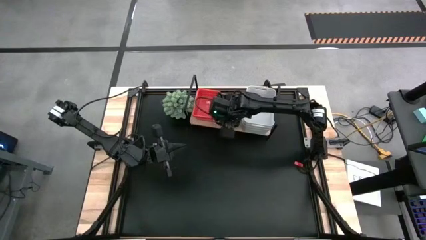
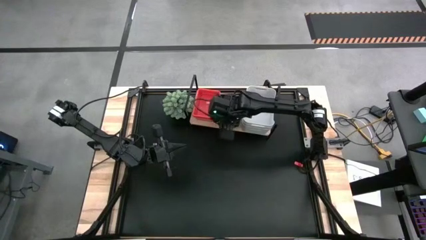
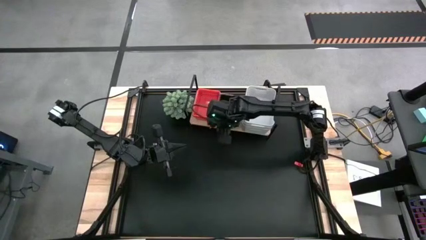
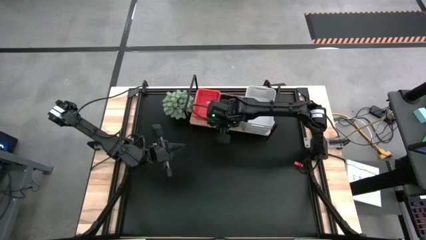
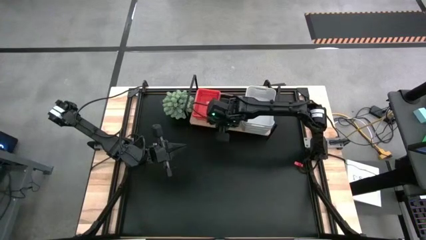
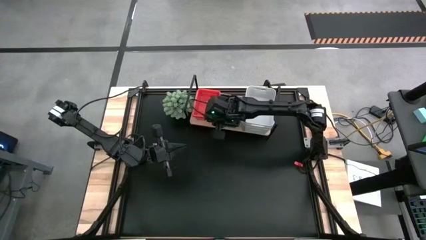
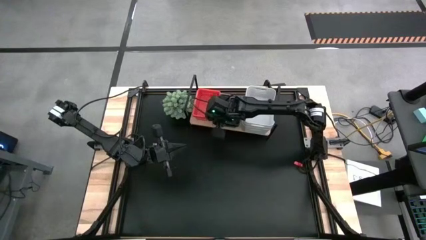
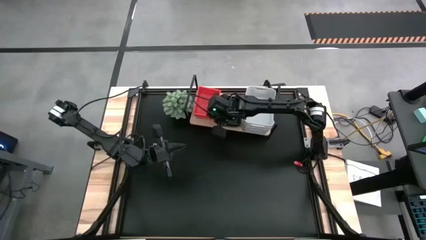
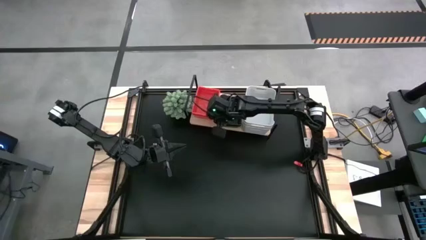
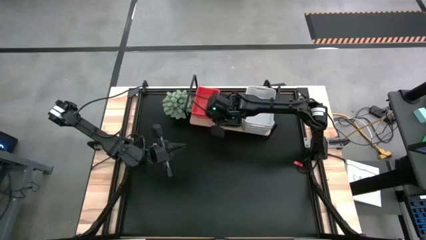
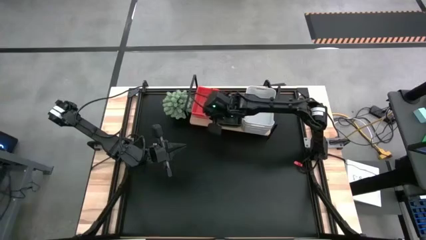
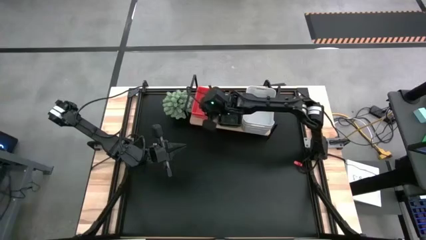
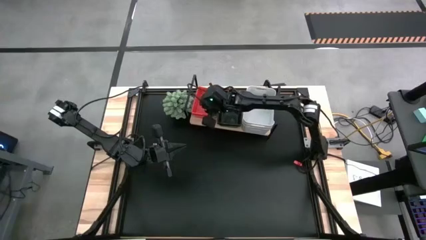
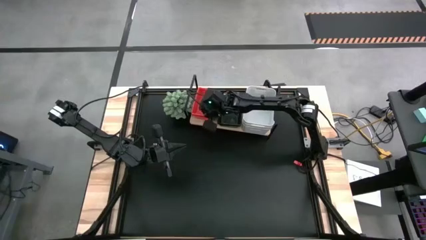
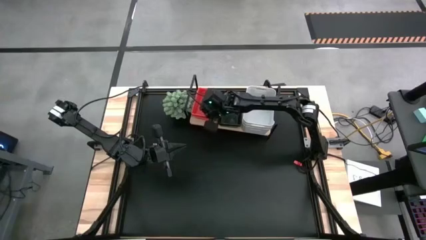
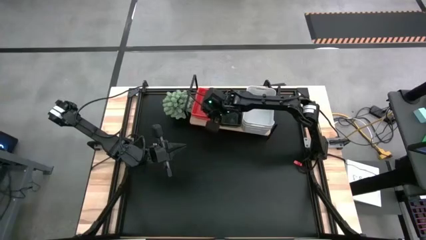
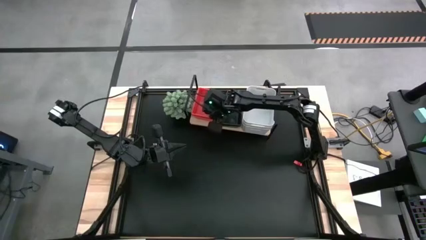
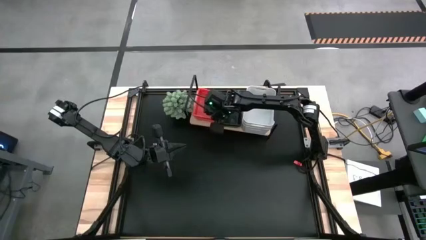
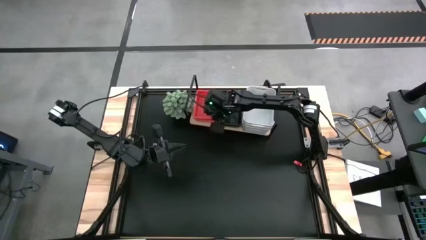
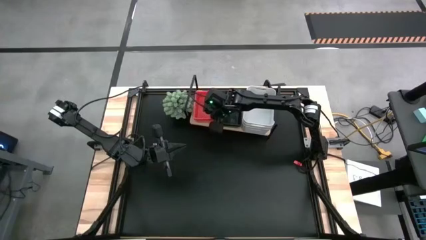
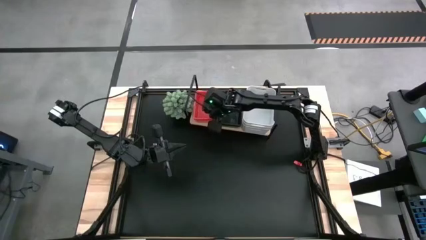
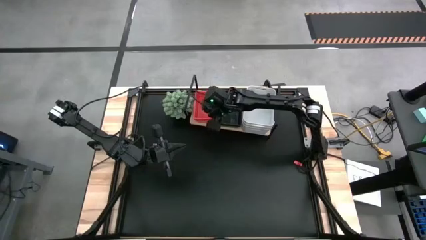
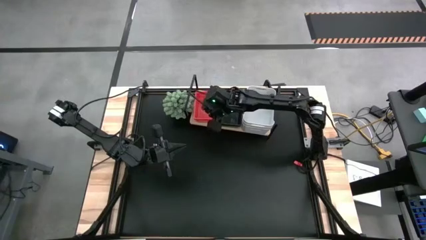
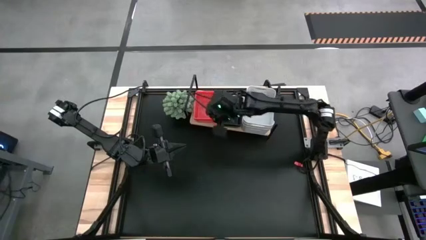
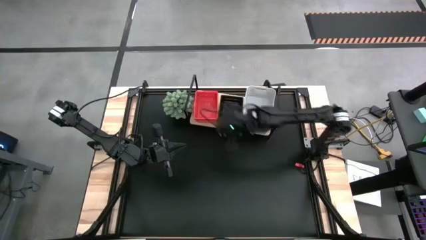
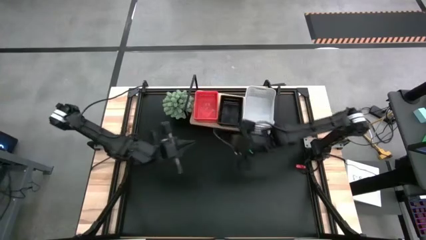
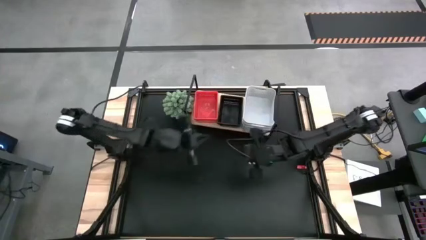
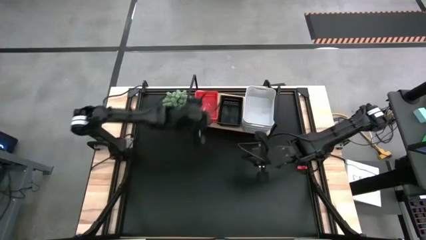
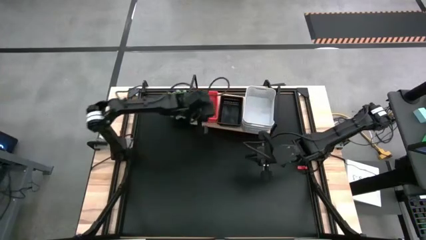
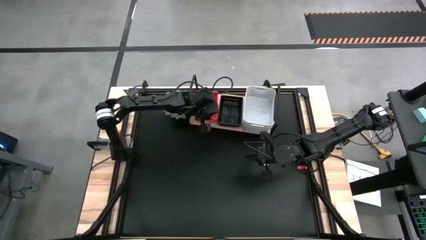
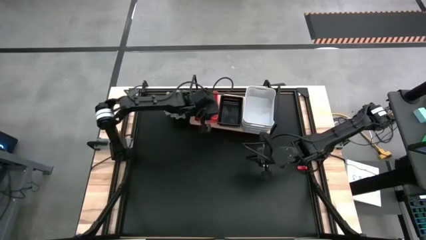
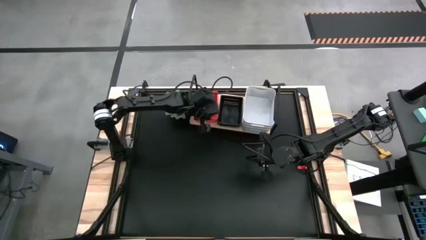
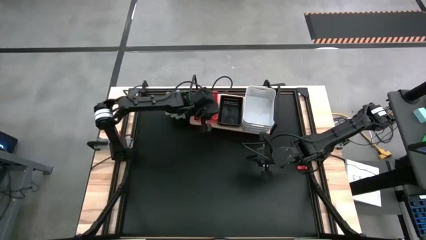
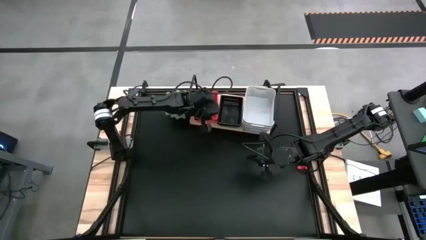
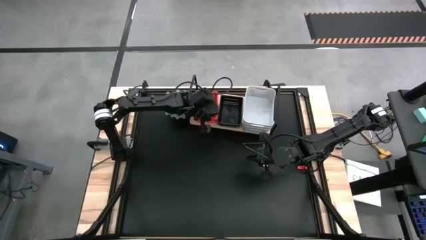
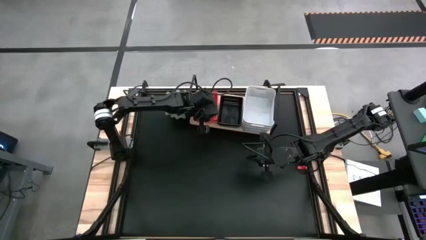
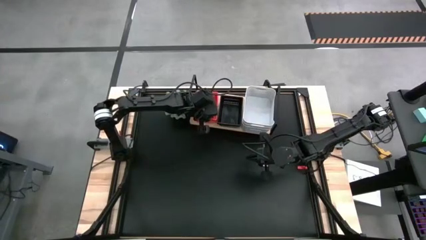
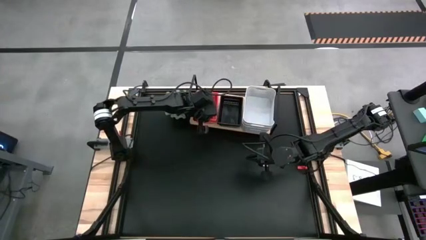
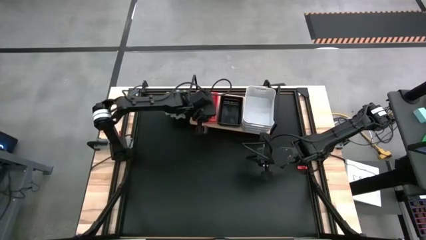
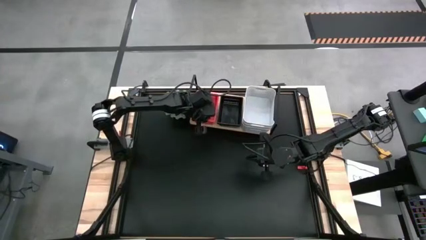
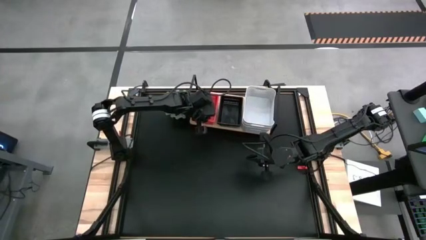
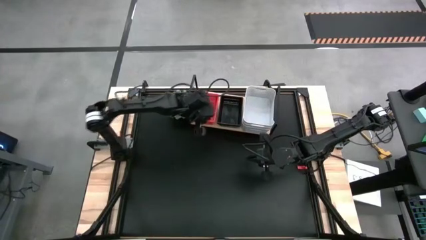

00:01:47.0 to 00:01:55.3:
Task: Stack baskets on shelf by color
Adjust the stacked red baskets on the shelf

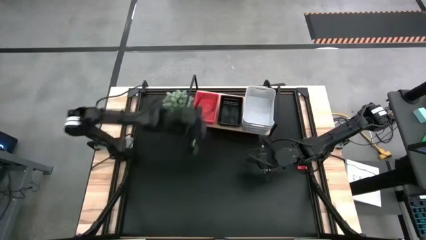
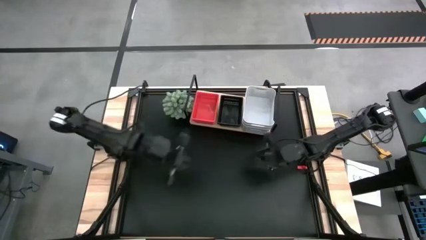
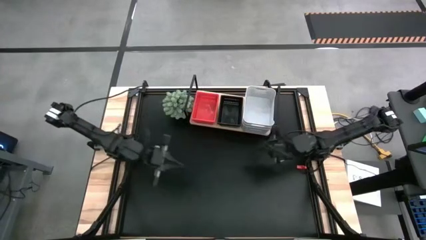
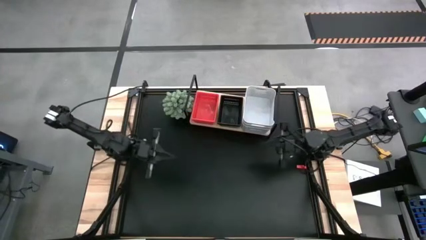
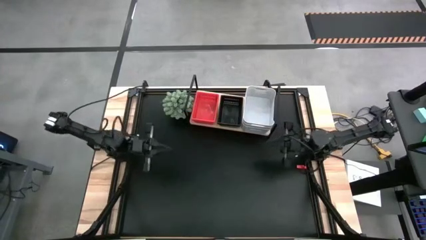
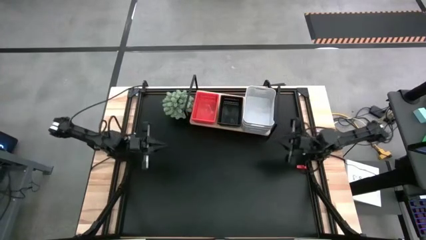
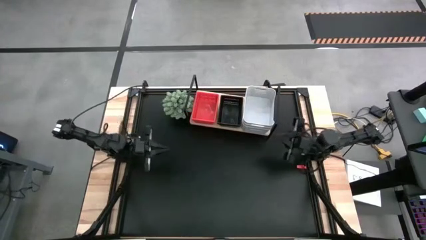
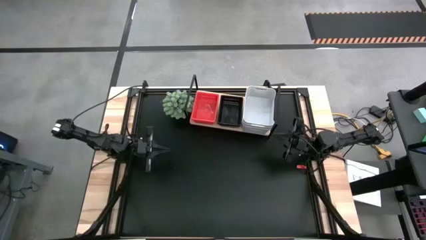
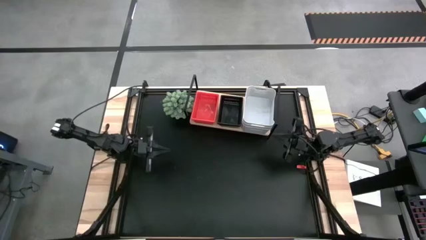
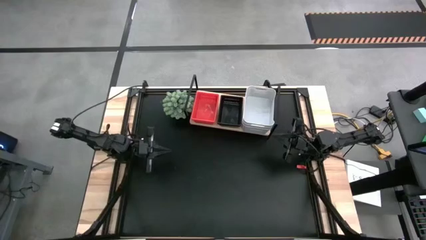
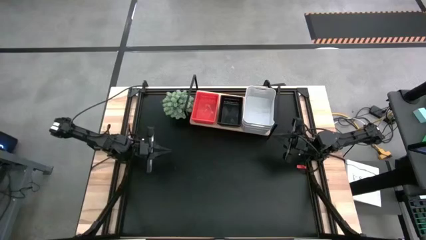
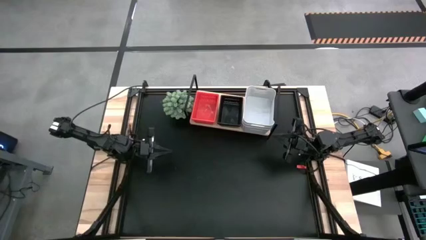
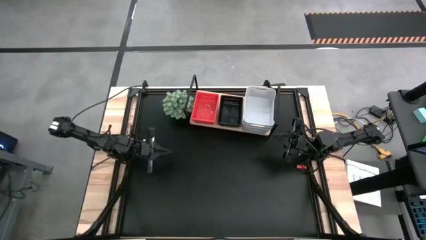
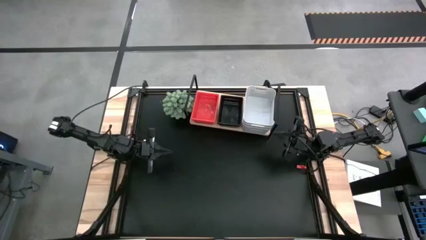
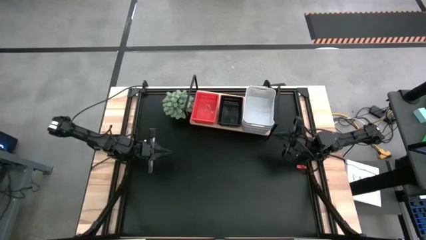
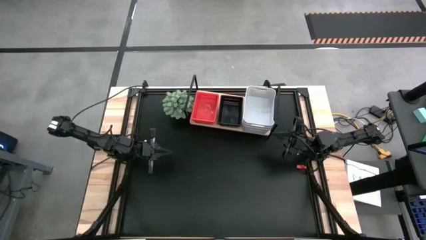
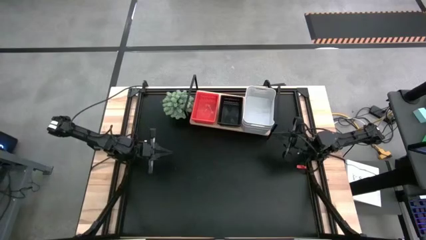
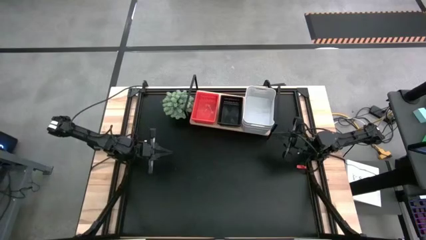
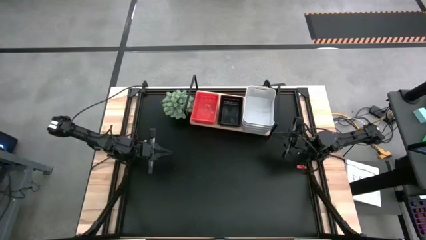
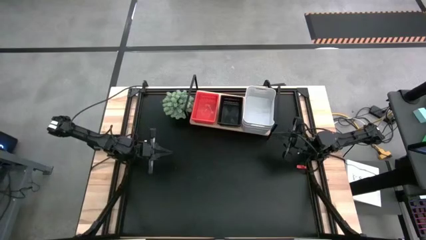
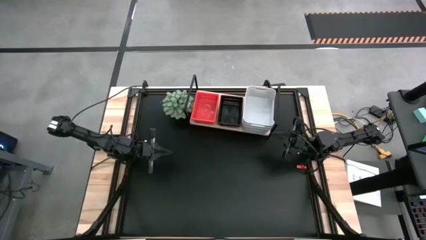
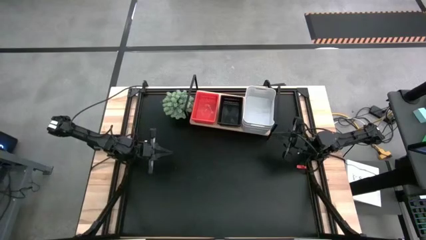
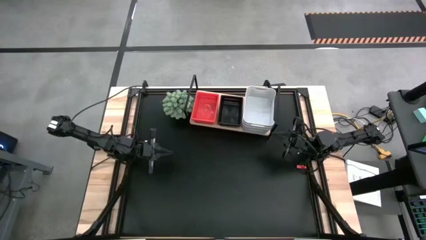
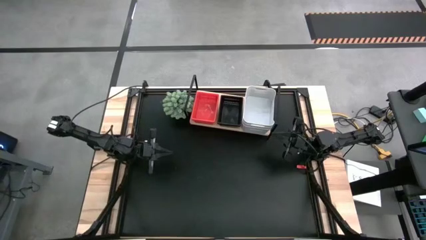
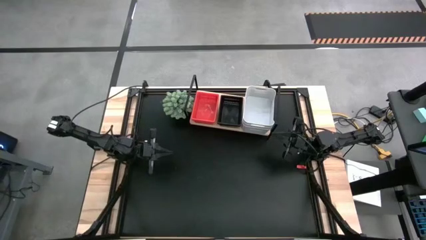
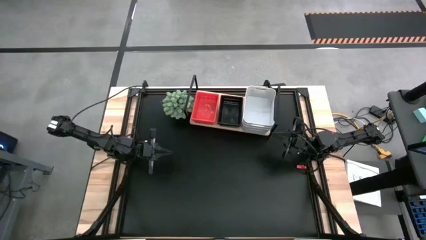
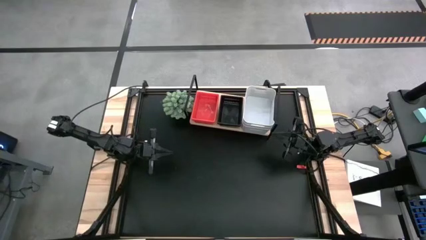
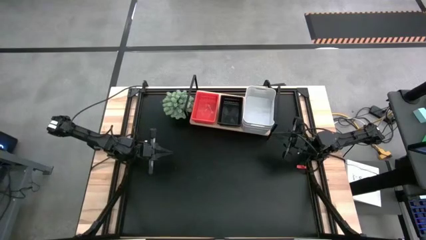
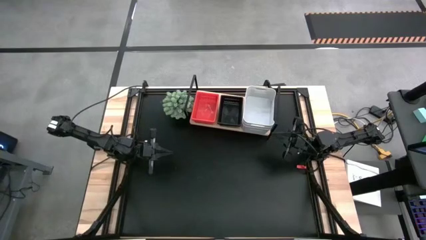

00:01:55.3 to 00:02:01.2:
Return to Home Position
